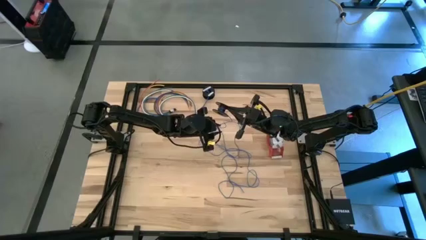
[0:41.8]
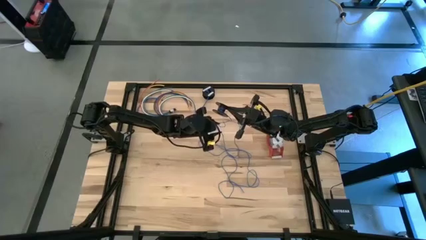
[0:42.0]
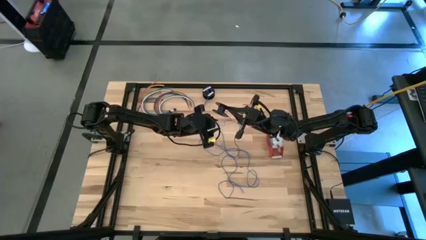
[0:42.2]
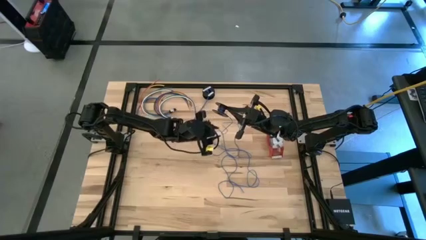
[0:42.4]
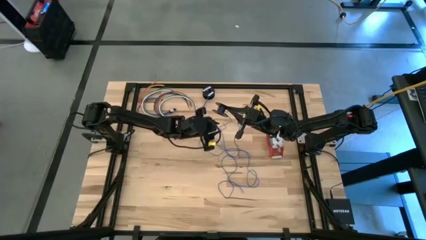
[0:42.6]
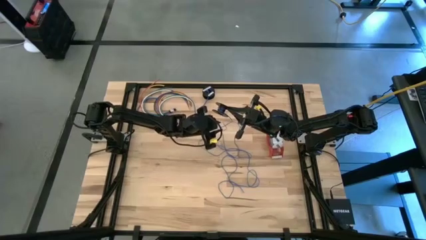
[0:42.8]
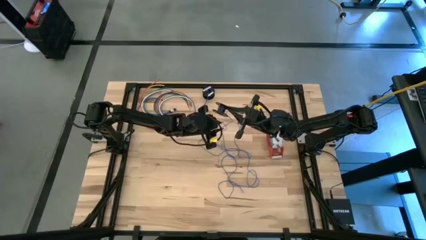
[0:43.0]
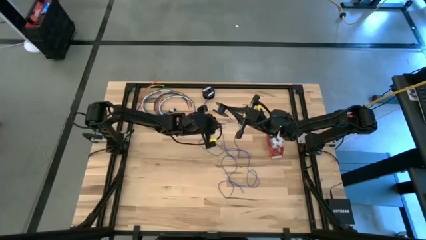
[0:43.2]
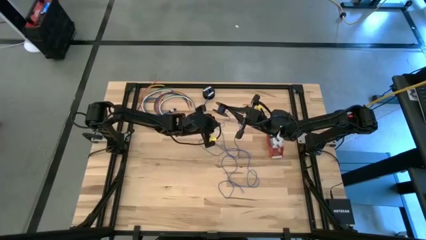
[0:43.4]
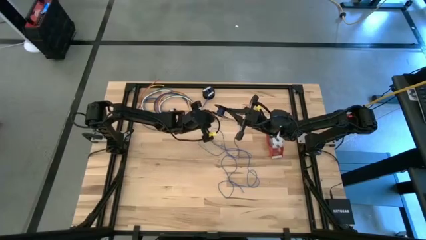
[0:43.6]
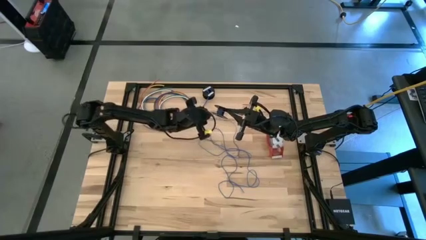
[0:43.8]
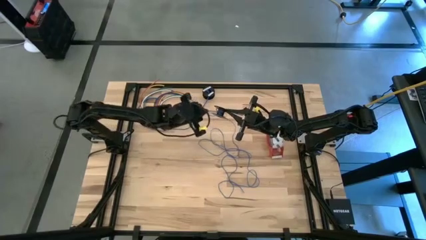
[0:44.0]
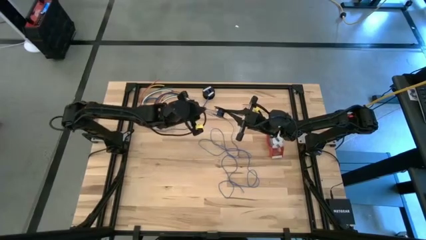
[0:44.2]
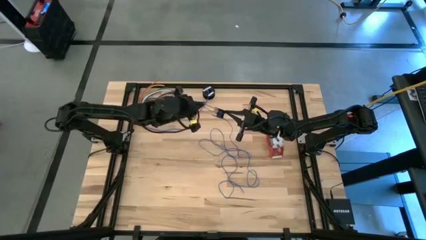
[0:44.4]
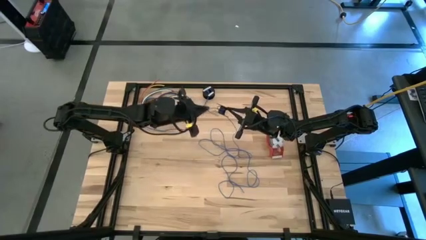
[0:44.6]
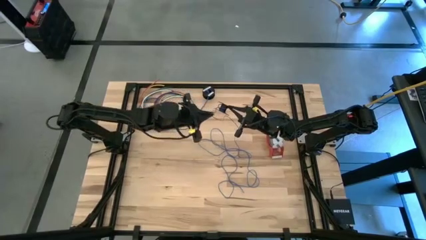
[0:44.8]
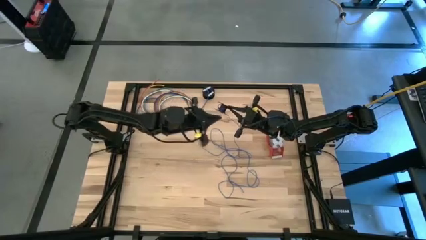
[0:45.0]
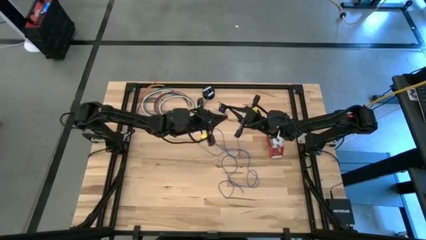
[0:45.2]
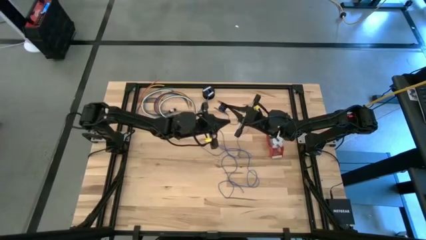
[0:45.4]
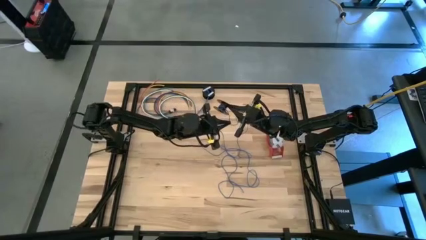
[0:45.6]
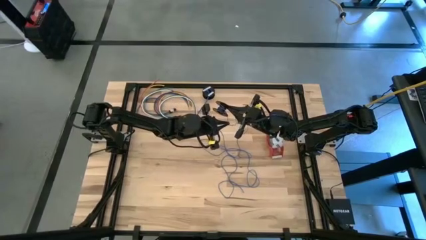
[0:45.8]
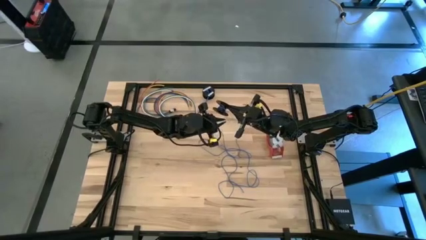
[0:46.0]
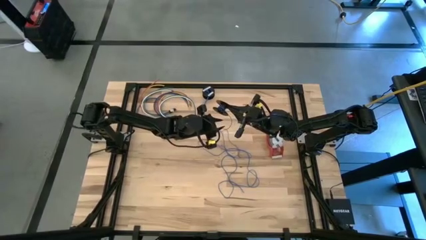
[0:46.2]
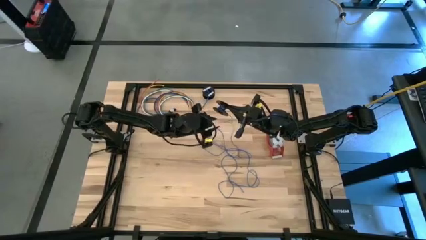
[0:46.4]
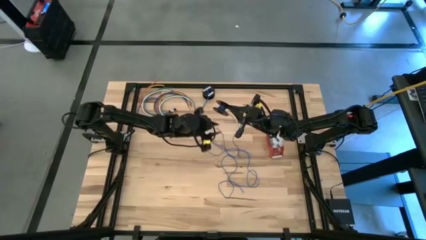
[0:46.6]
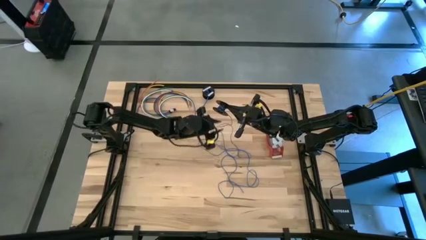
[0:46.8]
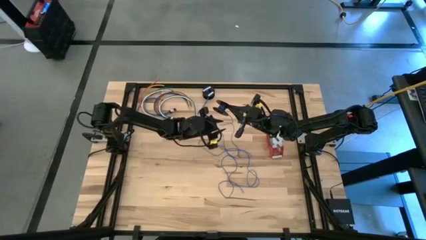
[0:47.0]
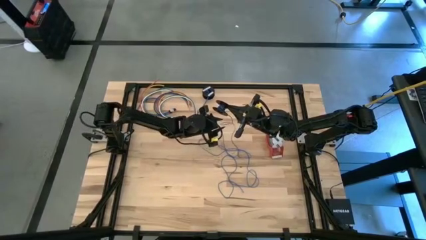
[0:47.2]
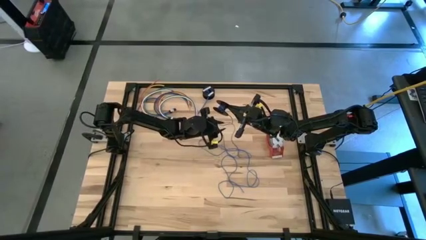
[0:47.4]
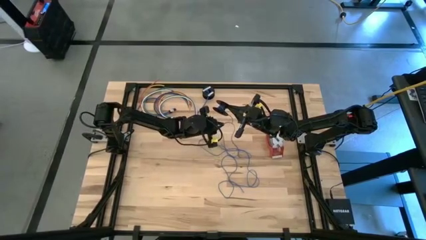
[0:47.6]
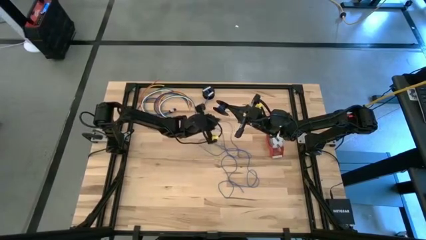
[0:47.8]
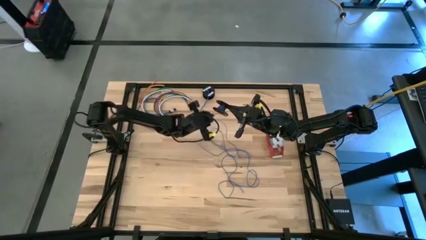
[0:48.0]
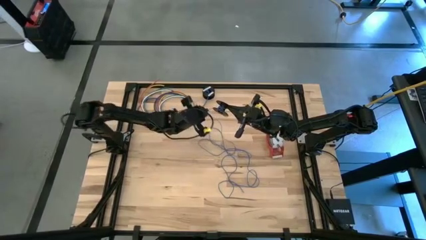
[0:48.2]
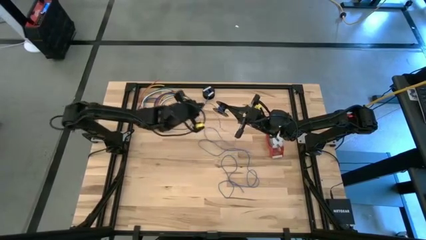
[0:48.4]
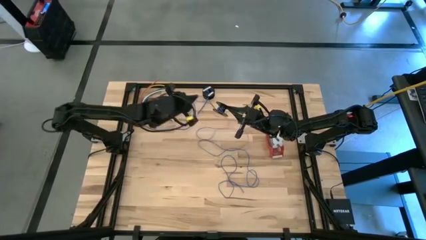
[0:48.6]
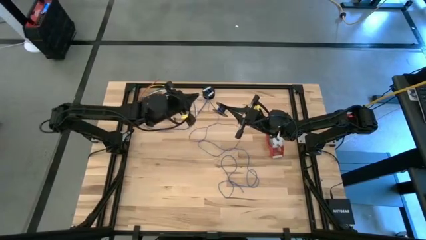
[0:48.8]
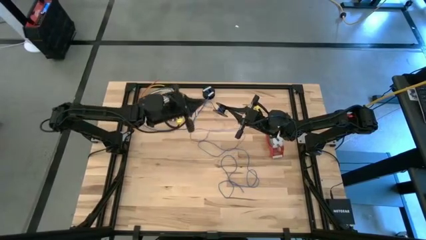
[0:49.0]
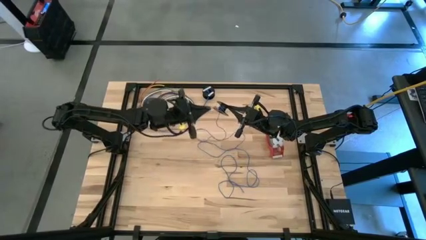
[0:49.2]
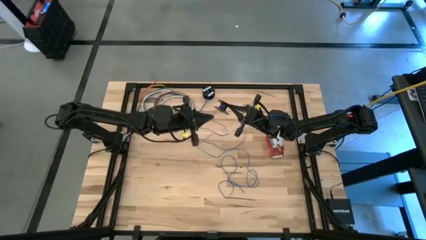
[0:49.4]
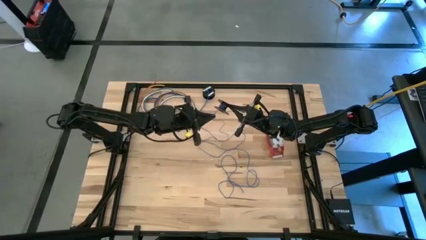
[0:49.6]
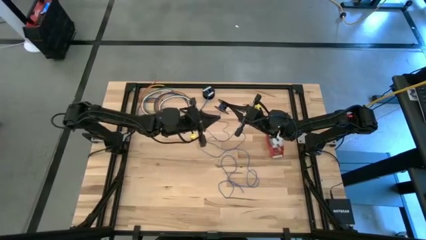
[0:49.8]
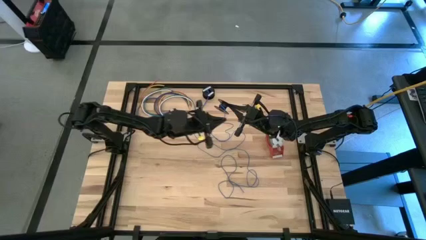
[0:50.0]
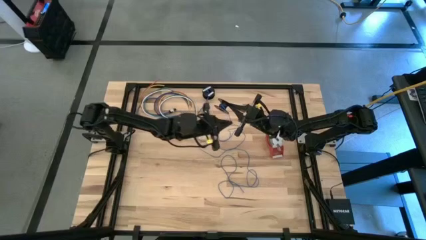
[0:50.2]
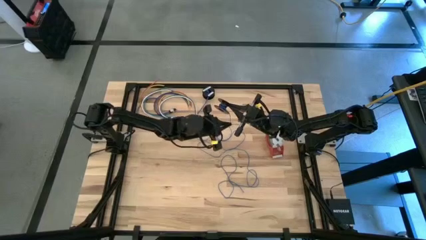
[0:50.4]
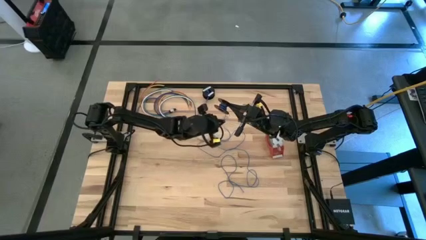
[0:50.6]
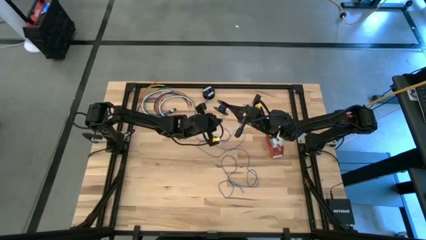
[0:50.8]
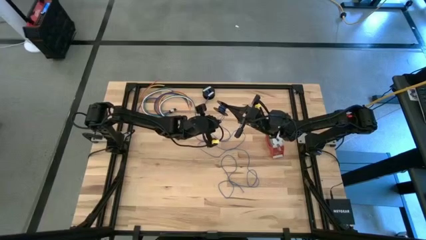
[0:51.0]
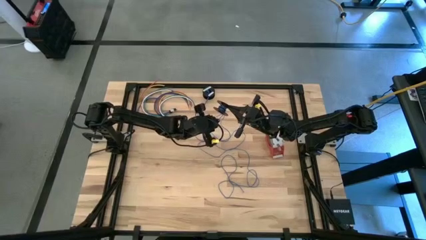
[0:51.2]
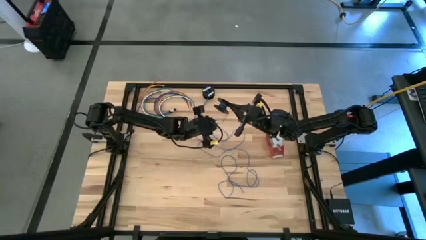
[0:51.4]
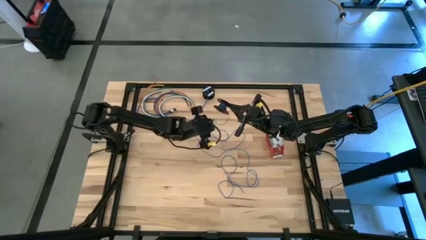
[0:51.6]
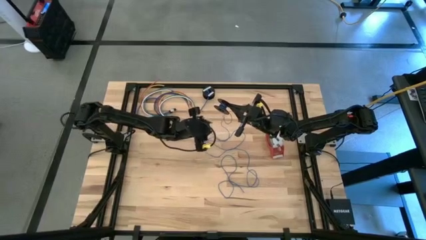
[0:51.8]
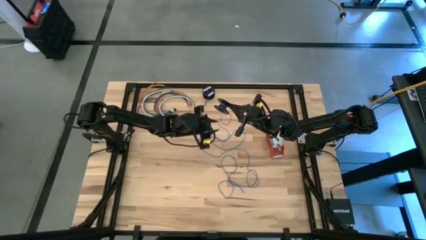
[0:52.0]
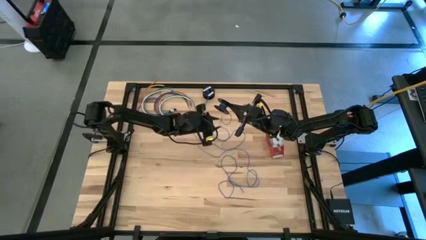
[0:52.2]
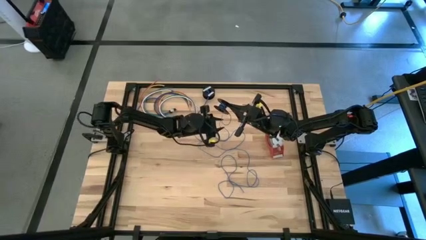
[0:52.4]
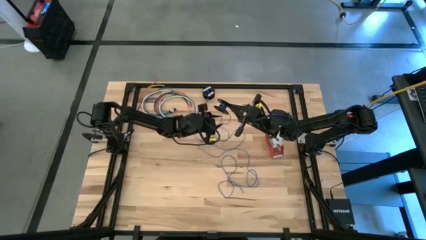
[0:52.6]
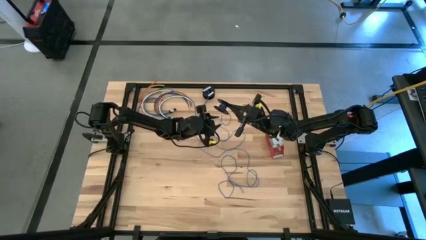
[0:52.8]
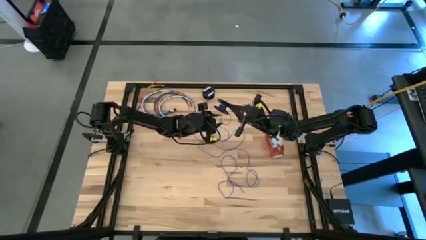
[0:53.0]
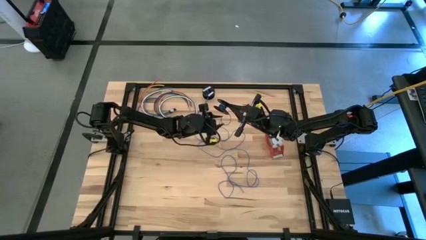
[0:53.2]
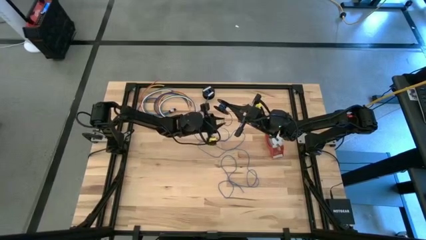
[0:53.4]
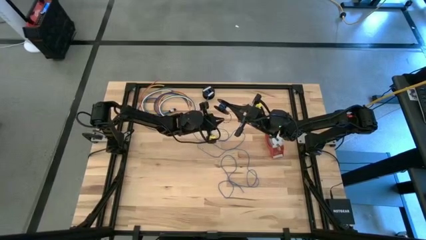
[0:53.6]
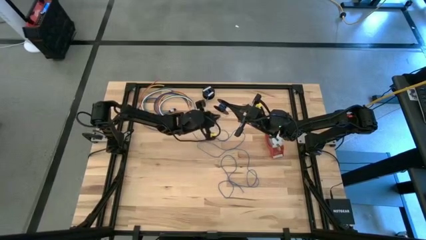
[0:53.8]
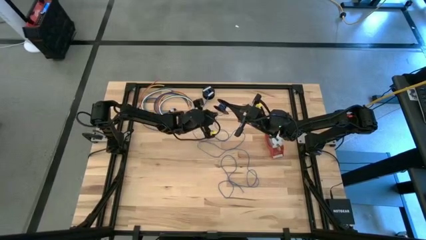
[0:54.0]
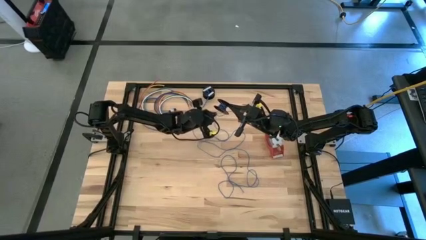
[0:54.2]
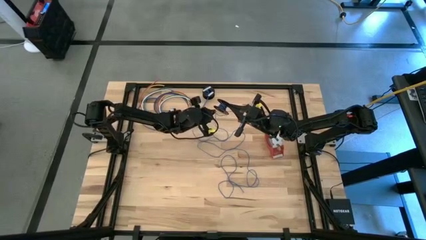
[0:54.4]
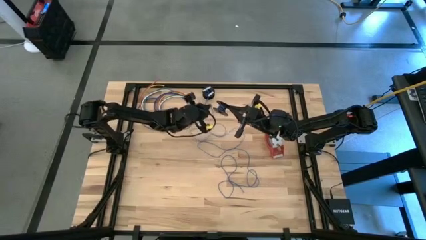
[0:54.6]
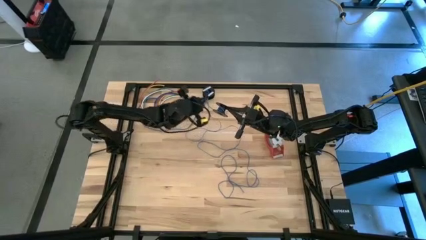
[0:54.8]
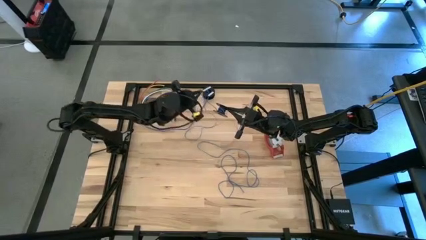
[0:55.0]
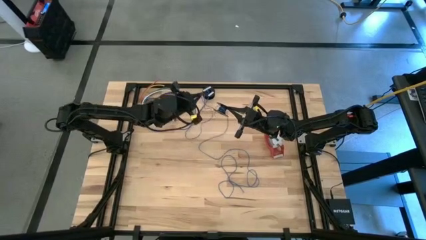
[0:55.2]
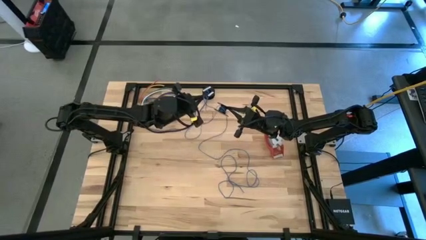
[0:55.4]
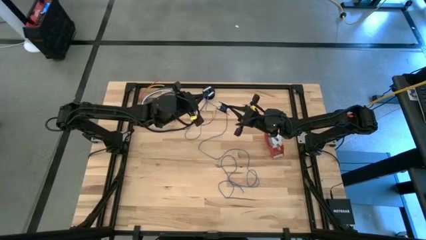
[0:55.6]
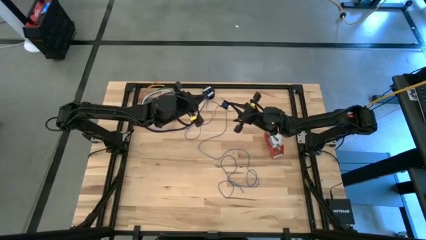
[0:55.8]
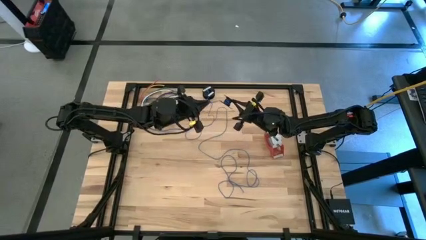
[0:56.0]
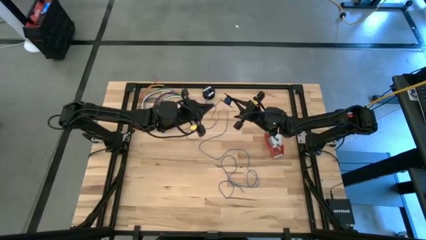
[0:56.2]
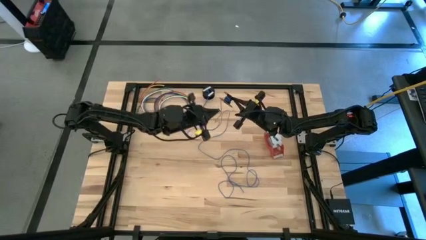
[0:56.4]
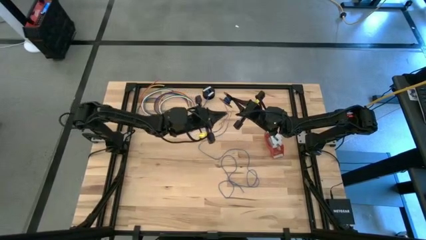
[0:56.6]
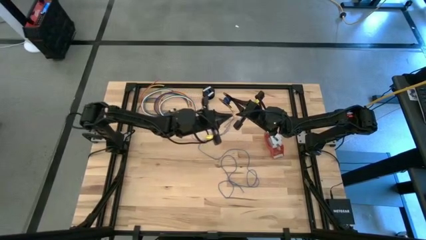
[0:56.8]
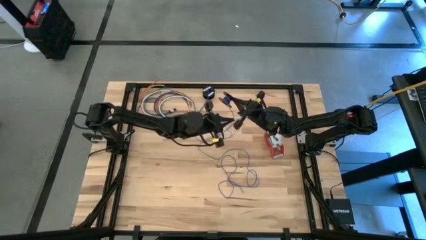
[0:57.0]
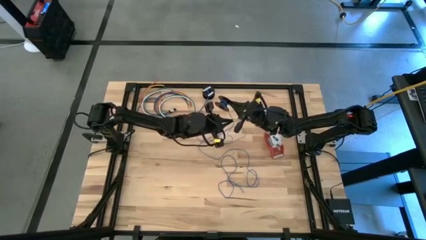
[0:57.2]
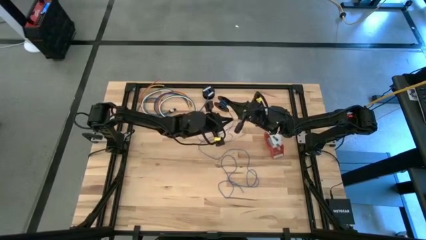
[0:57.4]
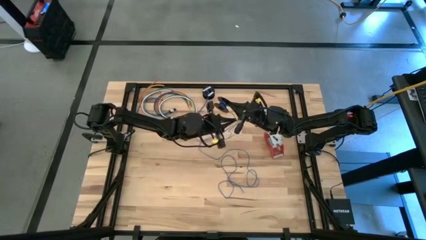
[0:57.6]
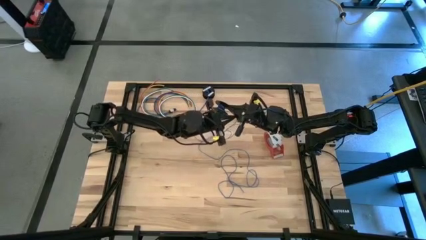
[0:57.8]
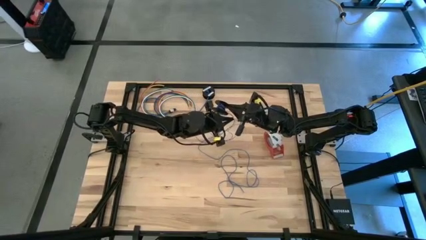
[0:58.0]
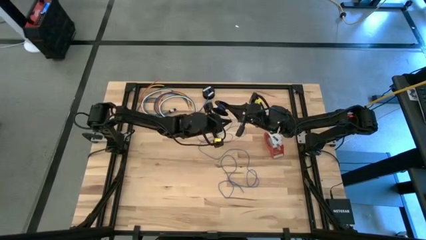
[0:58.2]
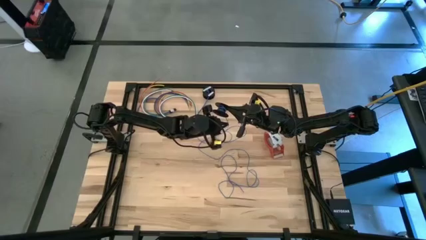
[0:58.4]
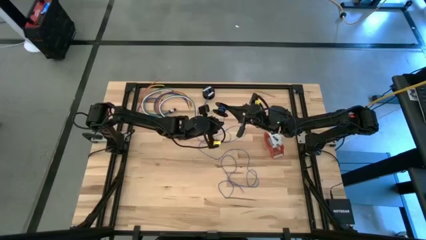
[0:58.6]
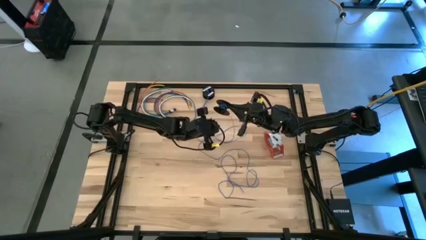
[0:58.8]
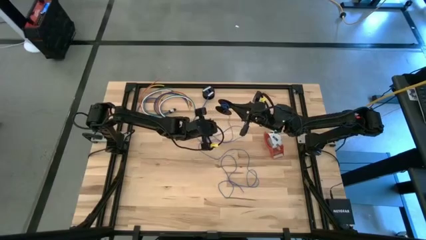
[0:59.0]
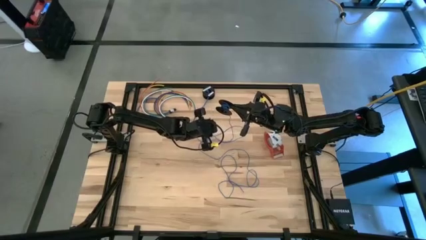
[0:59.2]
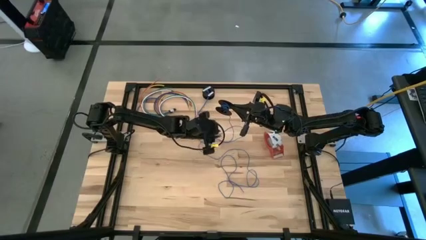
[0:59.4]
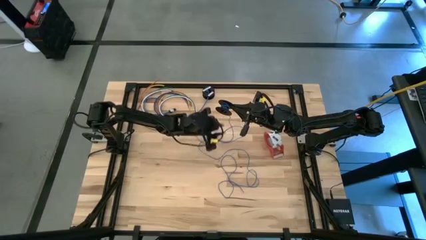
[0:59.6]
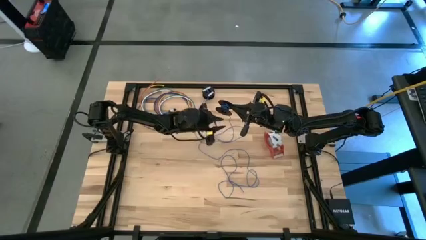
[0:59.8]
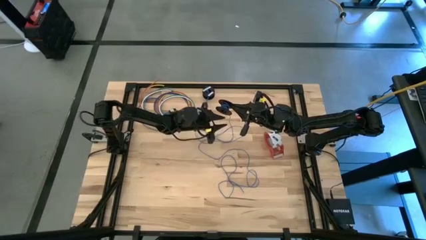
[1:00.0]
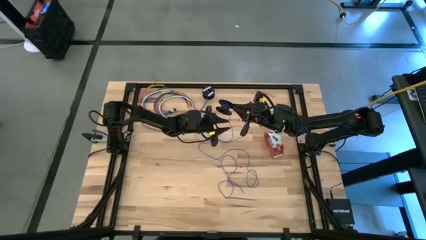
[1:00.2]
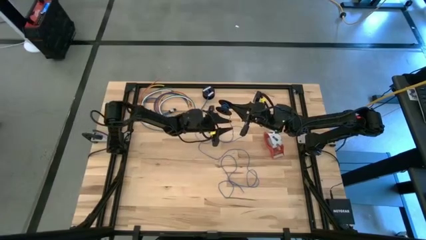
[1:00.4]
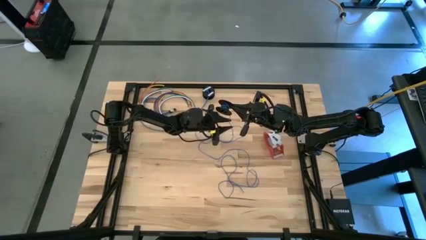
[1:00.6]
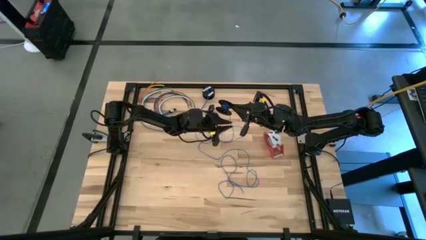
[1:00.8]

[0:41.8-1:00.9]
Task: Coil cords
Coil the blue wire onto the spool
